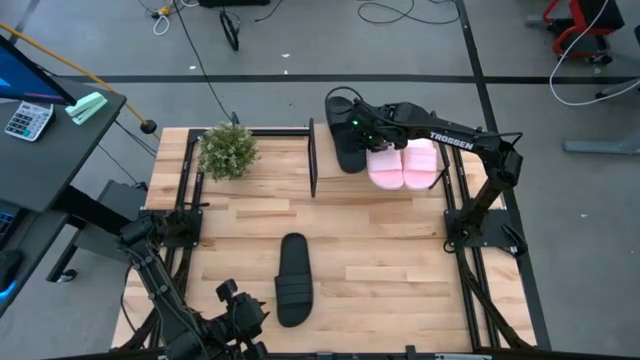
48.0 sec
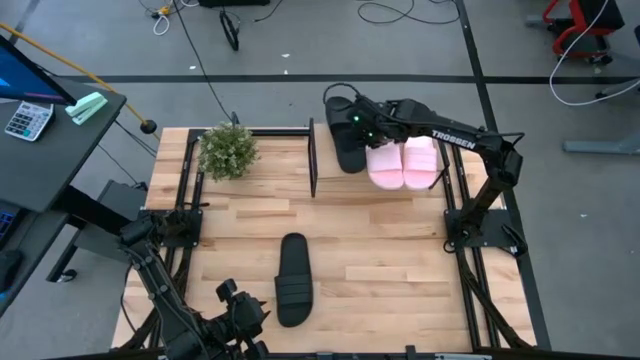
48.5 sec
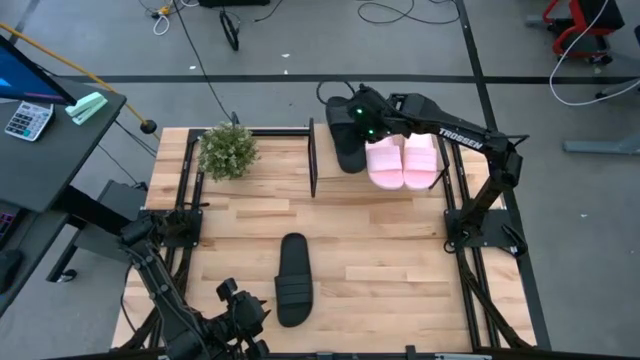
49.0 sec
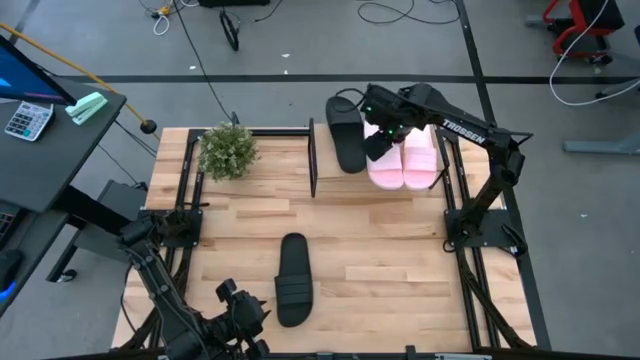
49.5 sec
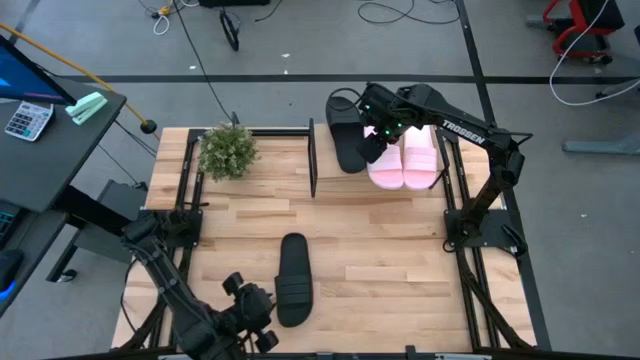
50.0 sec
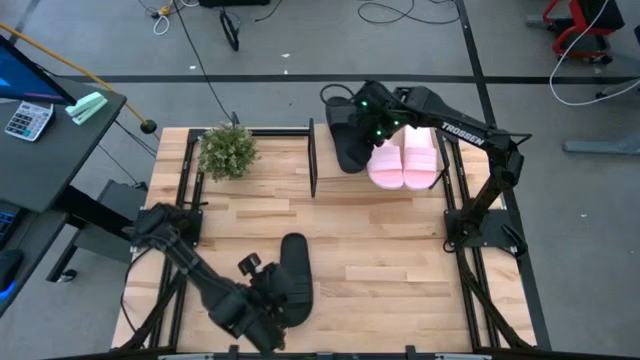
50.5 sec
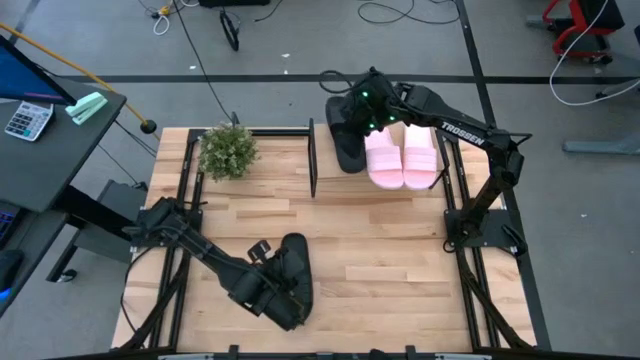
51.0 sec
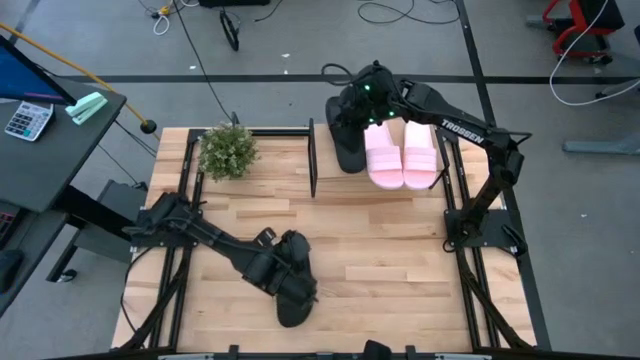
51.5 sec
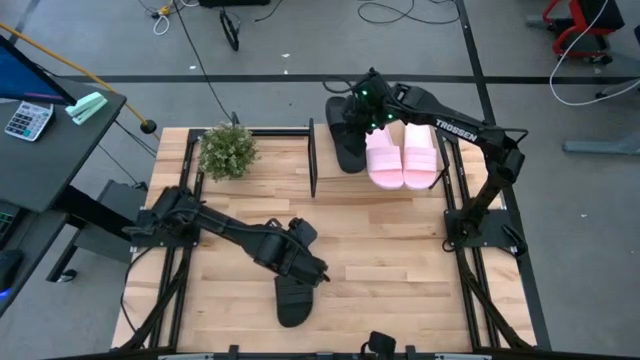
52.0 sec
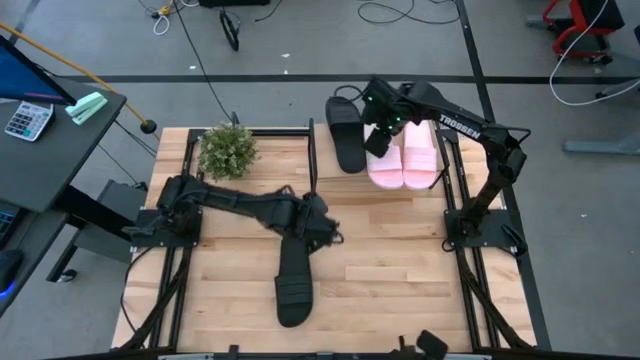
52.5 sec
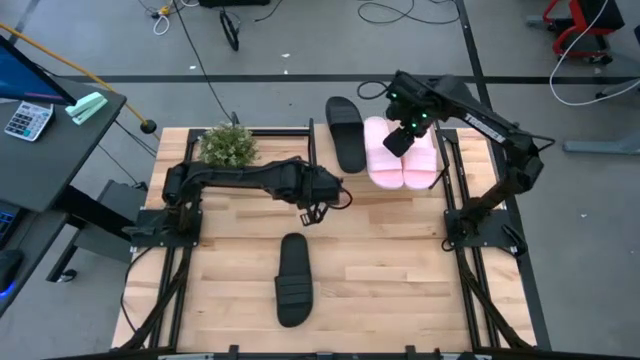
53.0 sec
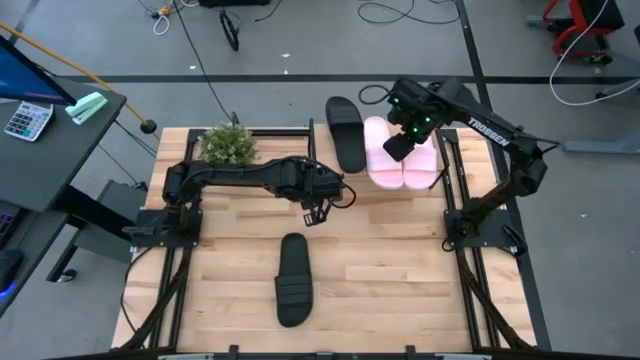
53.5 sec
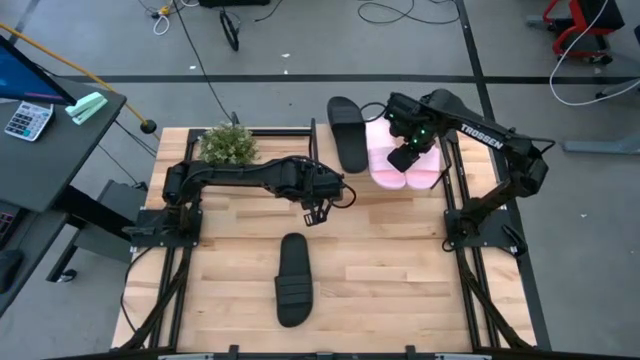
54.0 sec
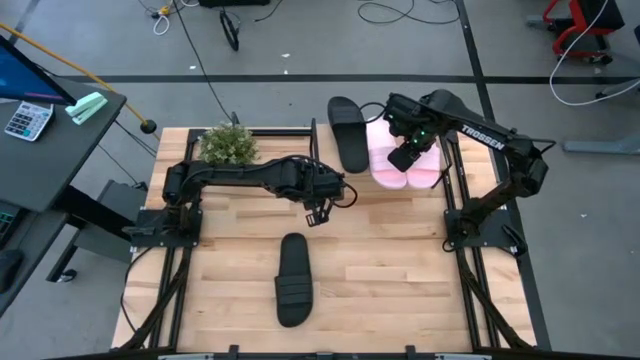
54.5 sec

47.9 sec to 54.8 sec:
Task: Pick and place slides into the shelf
Adjust the right pink slipper on the shelf

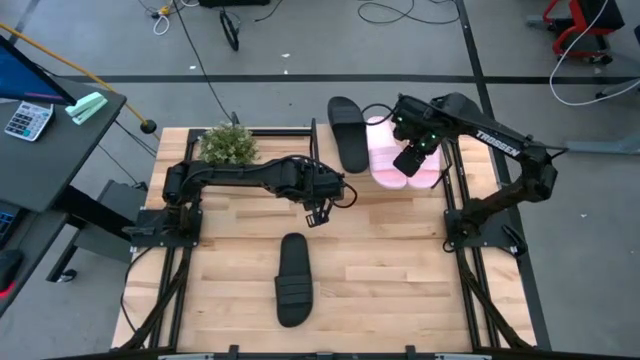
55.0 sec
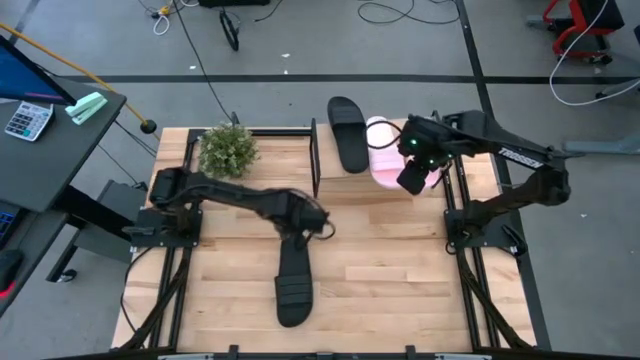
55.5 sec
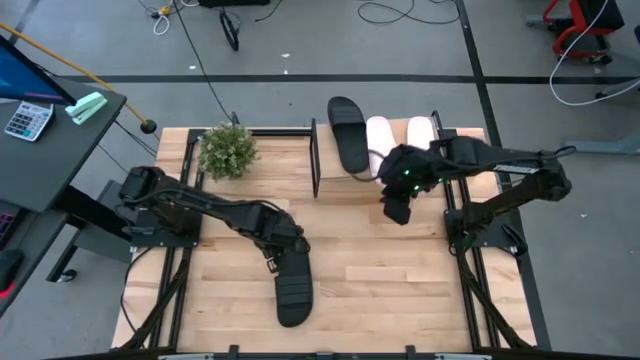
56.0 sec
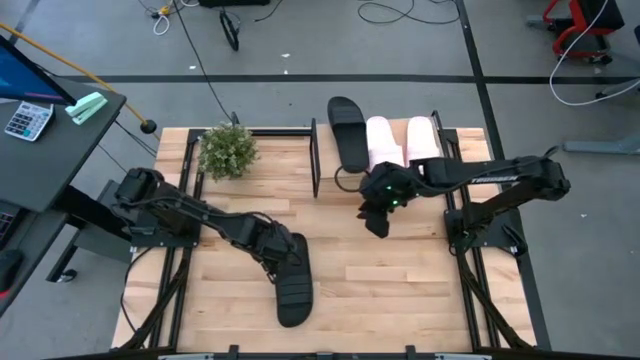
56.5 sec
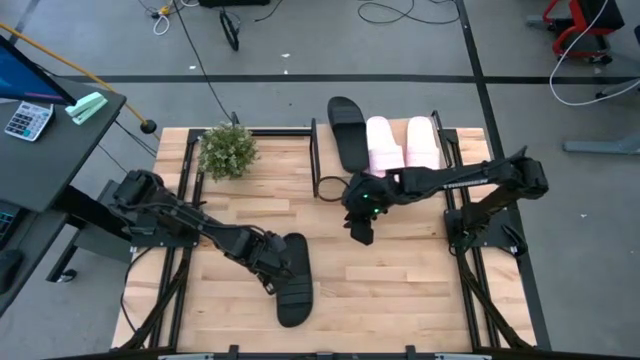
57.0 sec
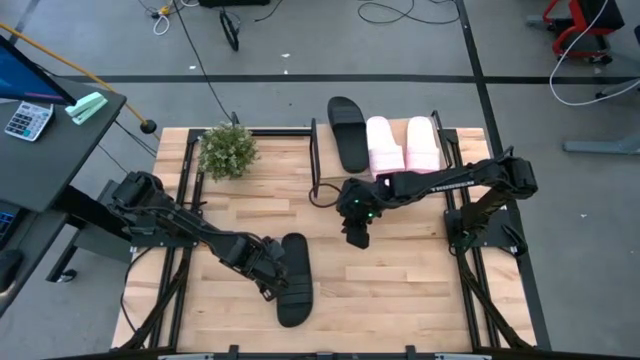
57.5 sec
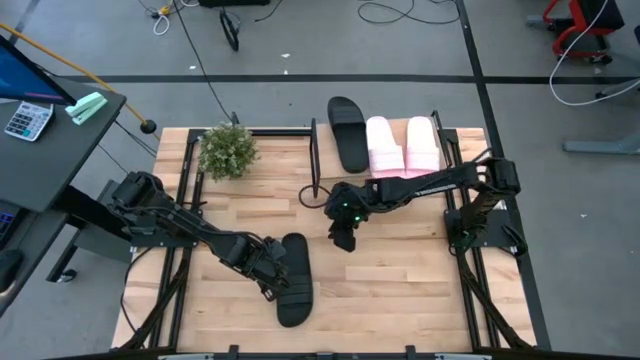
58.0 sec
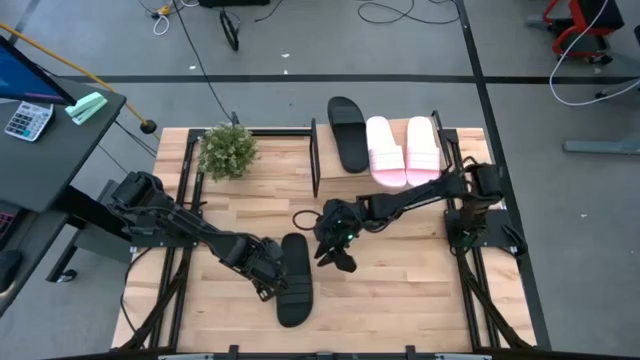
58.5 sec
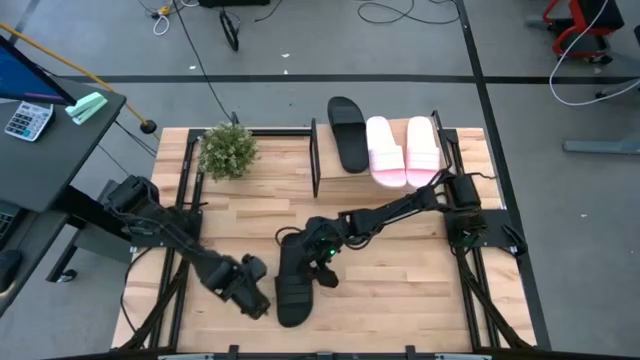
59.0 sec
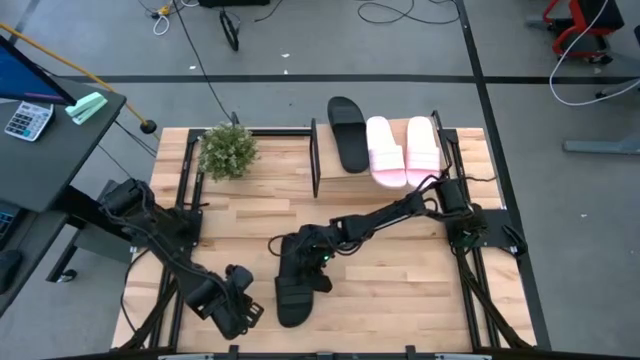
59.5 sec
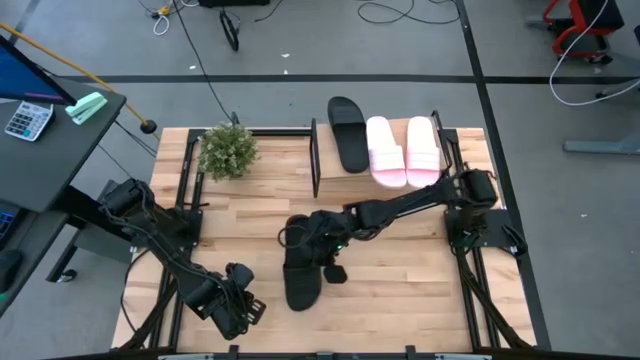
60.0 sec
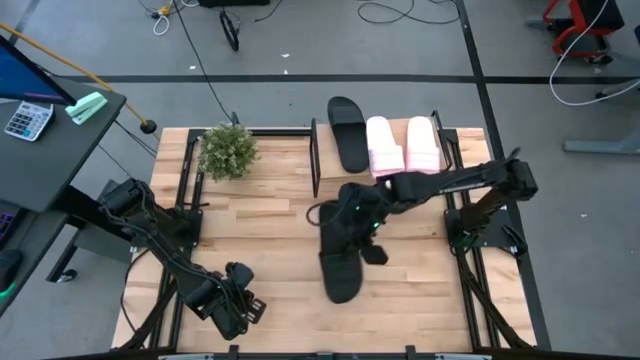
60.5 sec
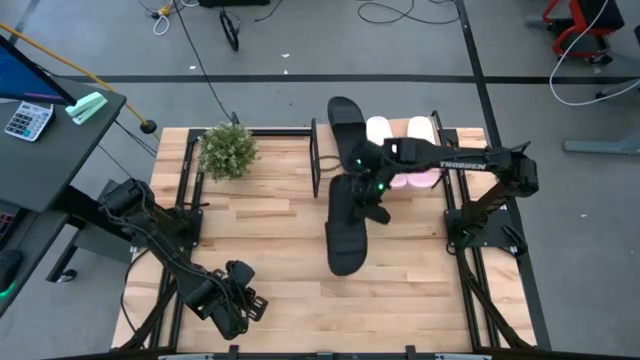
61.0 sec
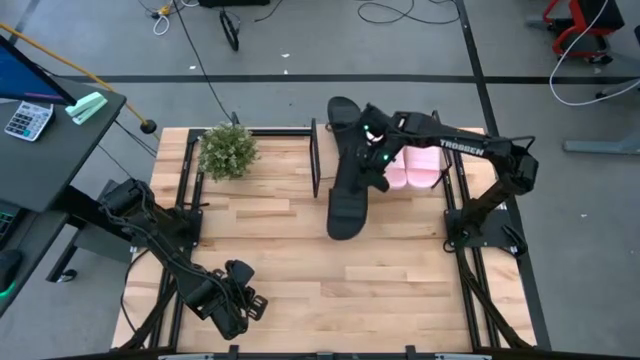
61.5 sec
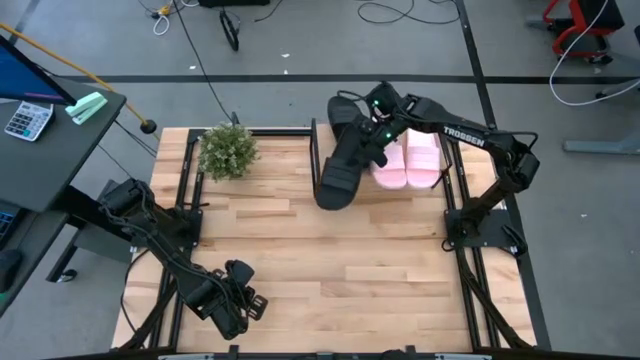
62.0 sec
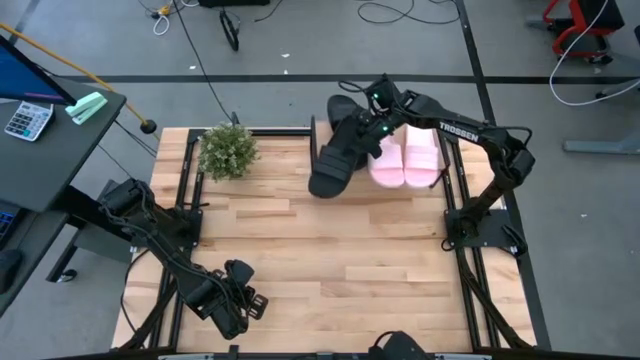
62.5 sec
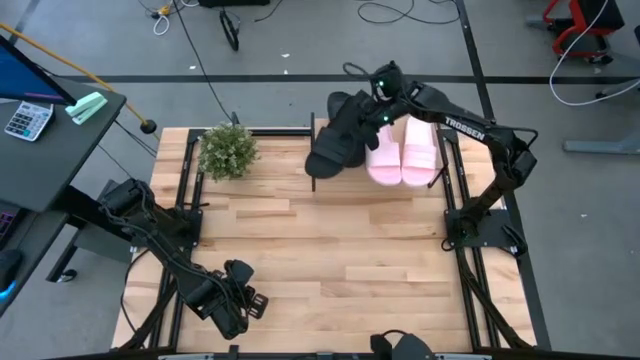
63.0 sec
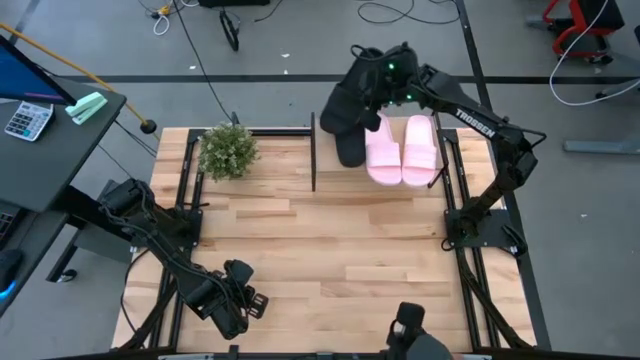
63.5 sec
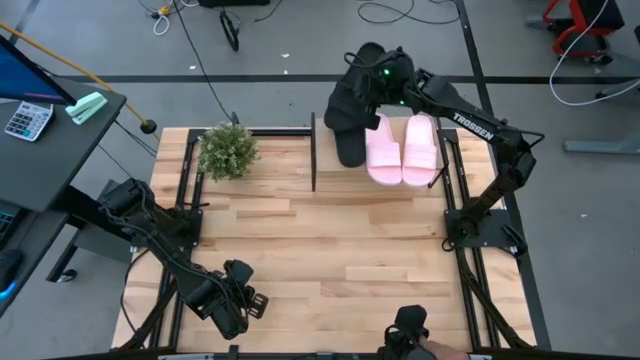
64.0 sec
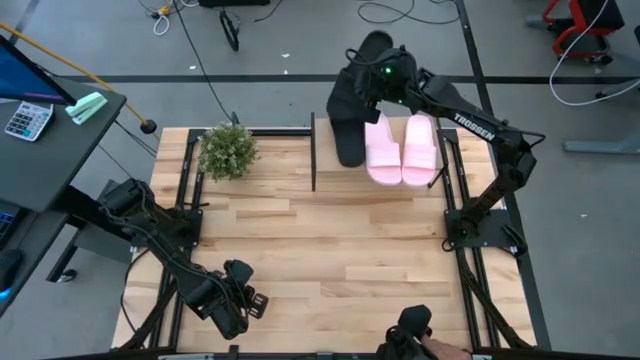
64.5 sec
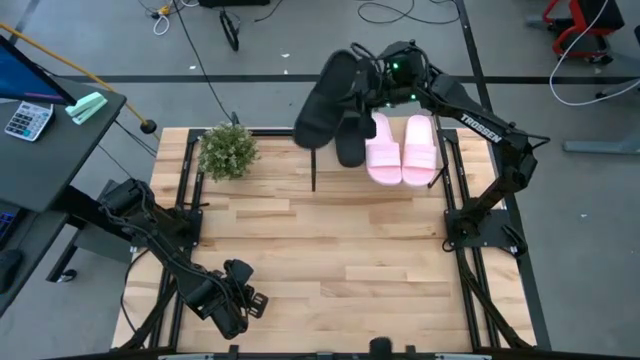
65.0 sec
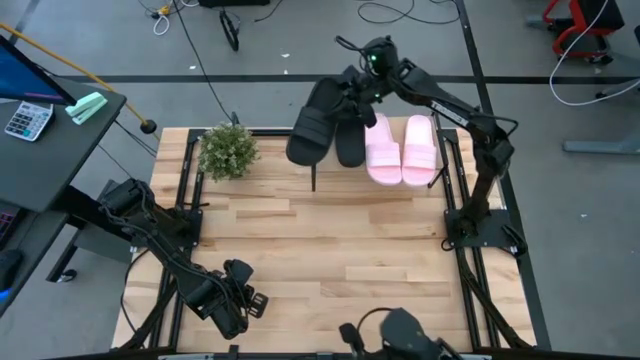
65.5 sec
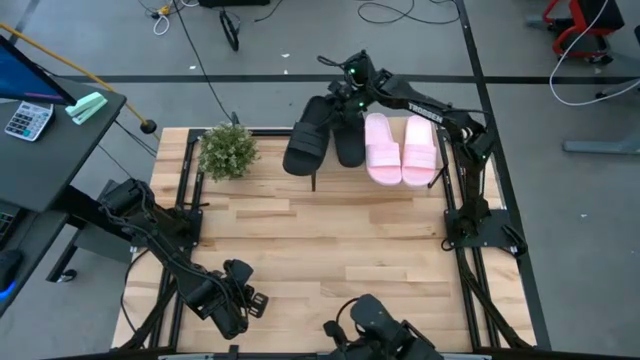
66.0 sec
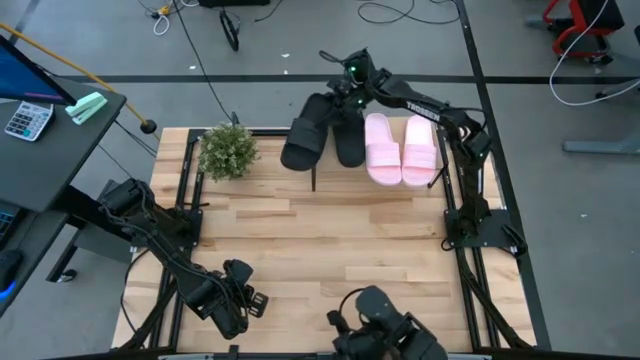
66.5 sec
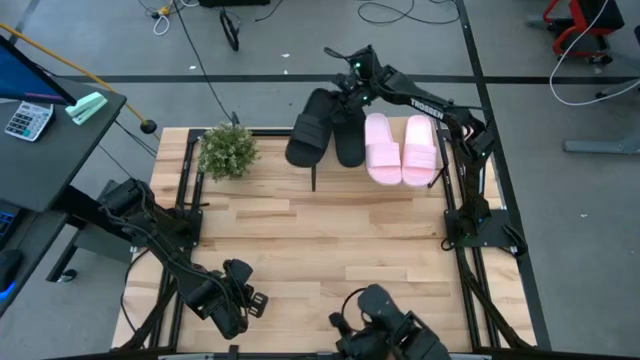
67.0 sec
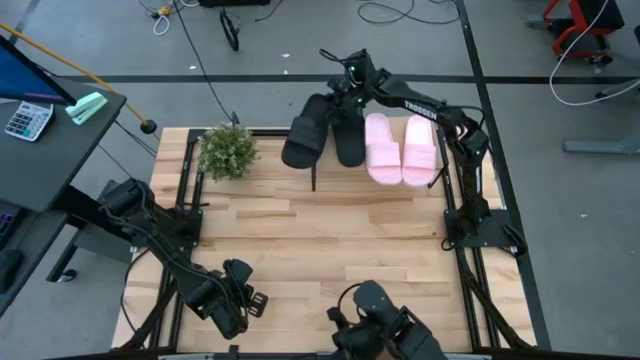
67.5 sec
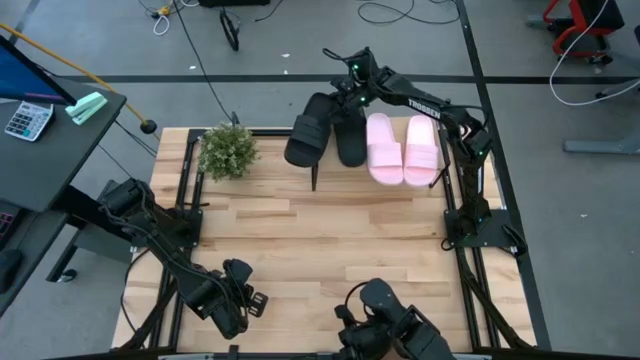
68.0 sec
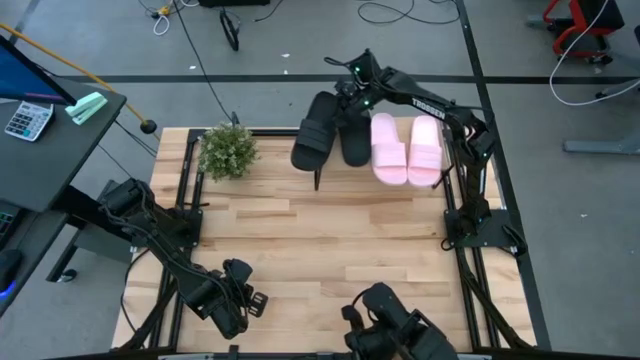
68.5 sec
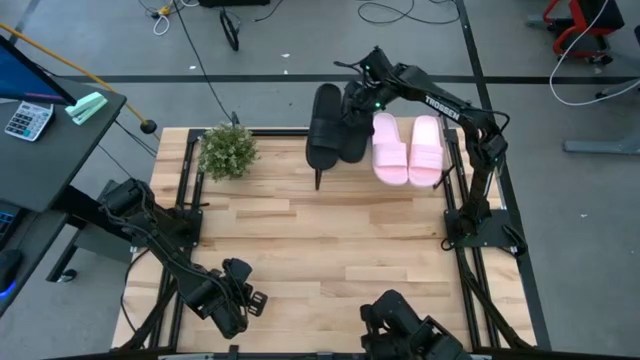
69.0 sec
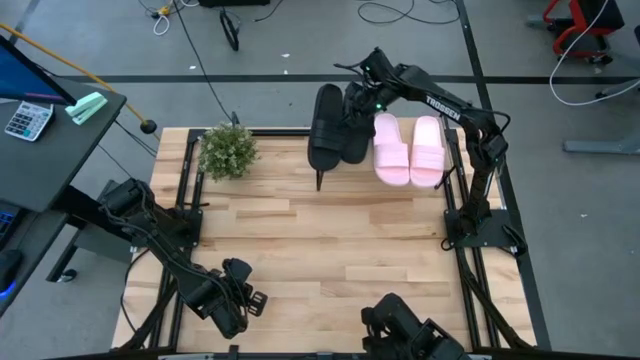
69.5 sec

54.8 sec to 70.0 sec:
Put the black slipper on the shelf
